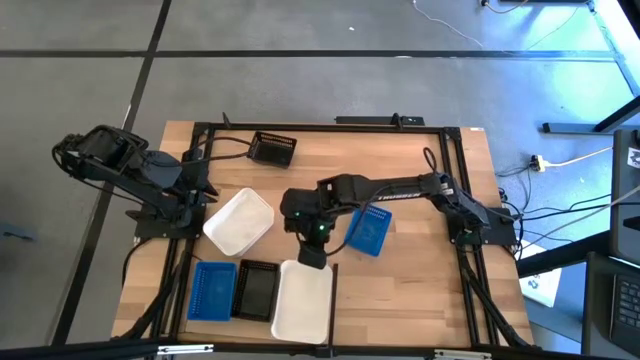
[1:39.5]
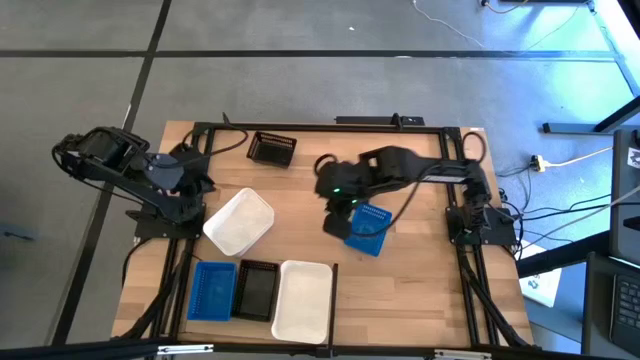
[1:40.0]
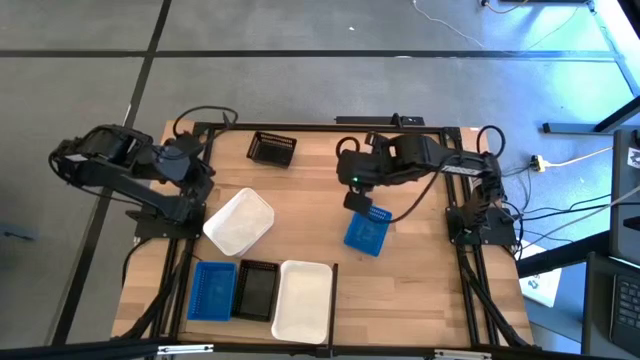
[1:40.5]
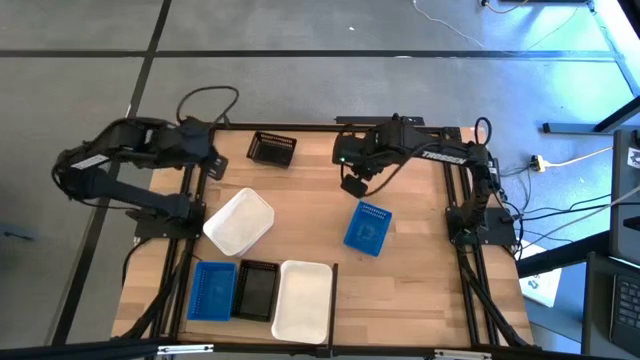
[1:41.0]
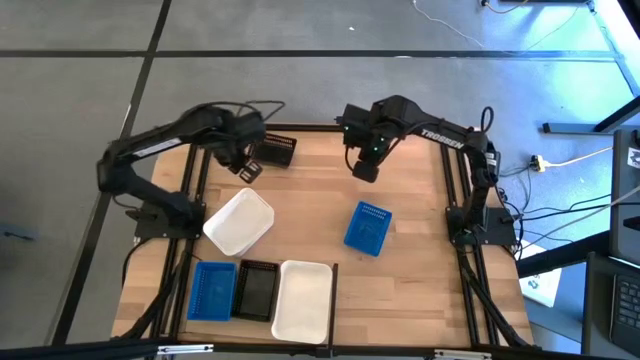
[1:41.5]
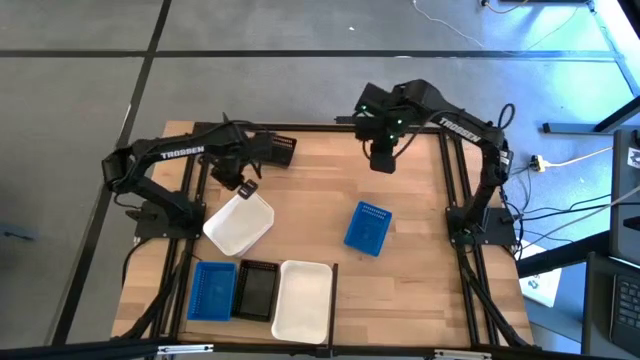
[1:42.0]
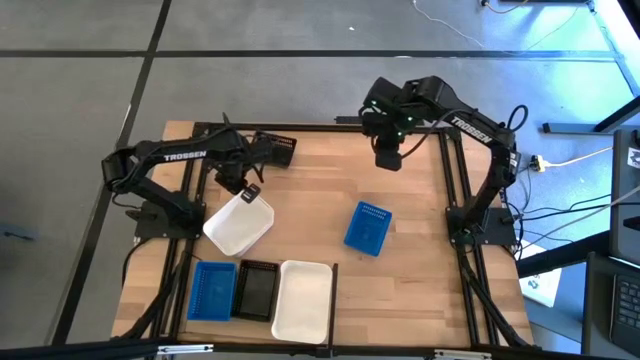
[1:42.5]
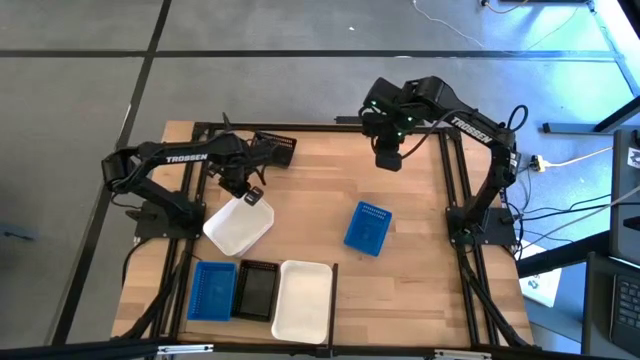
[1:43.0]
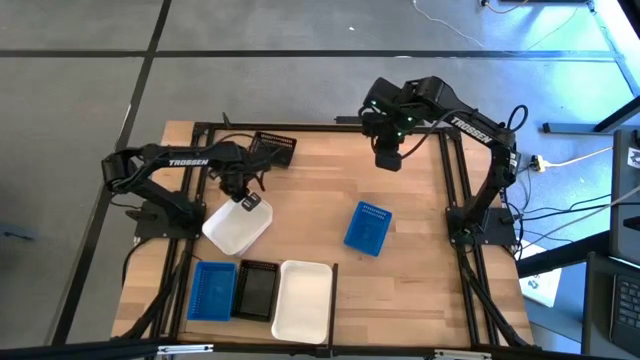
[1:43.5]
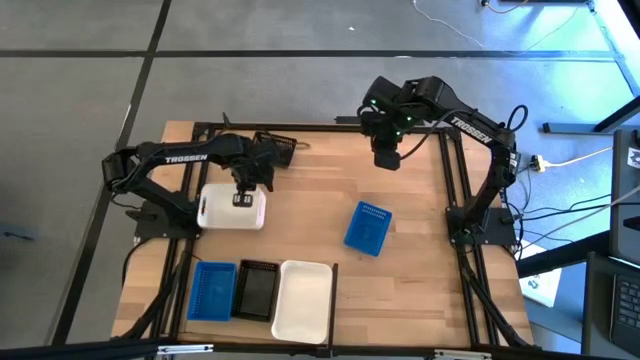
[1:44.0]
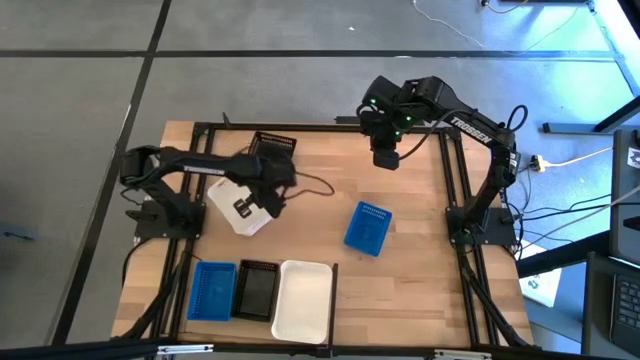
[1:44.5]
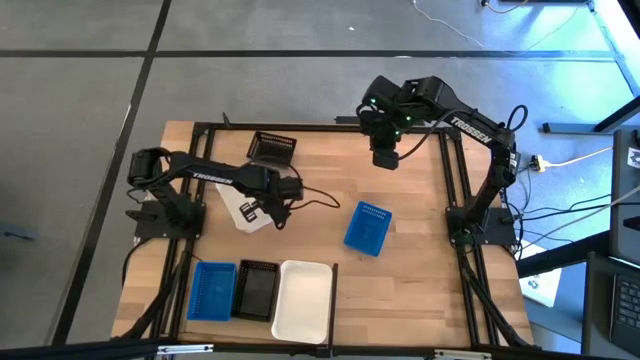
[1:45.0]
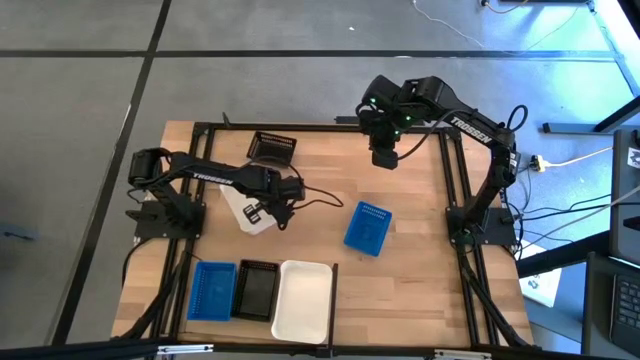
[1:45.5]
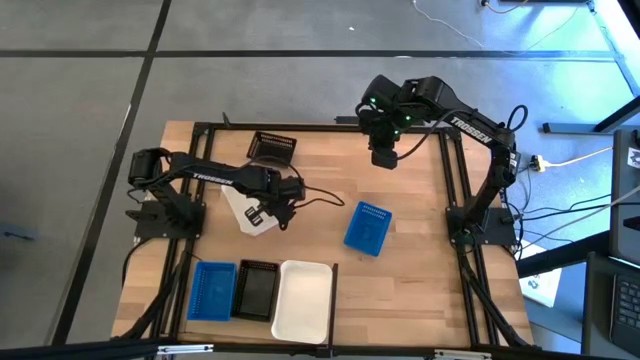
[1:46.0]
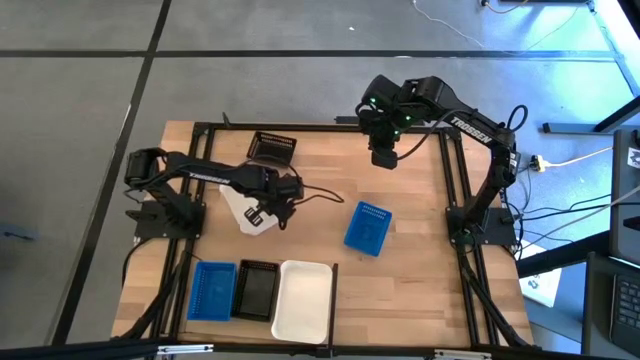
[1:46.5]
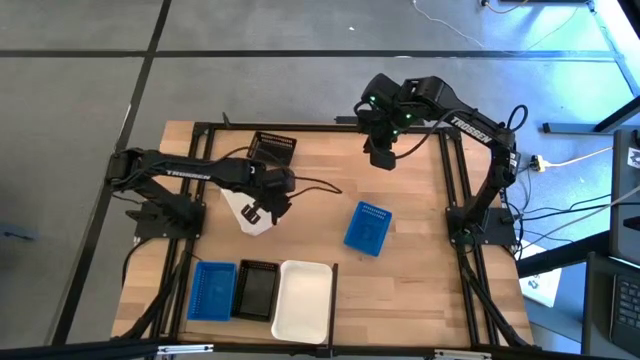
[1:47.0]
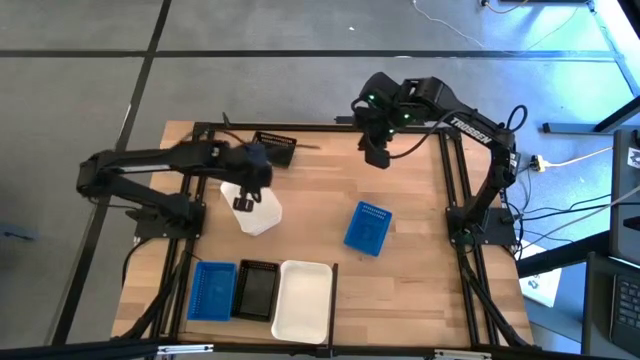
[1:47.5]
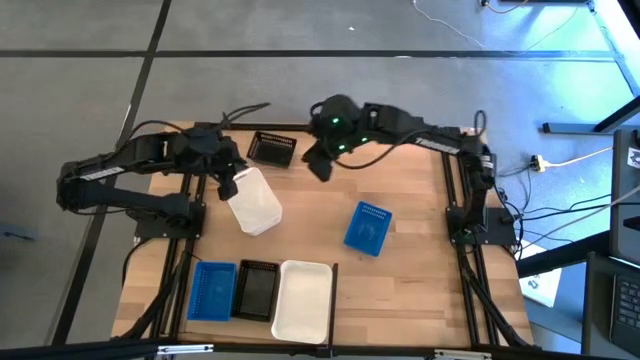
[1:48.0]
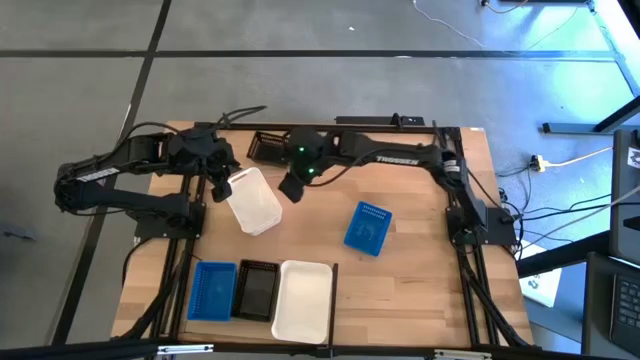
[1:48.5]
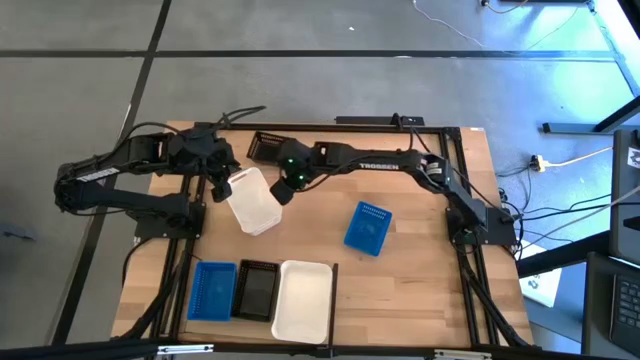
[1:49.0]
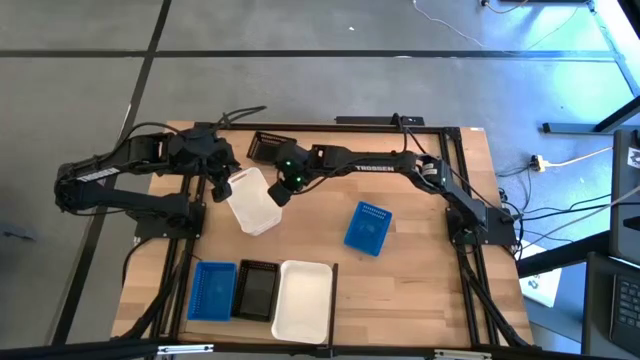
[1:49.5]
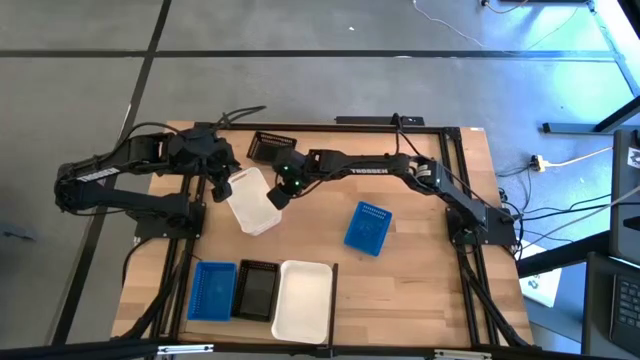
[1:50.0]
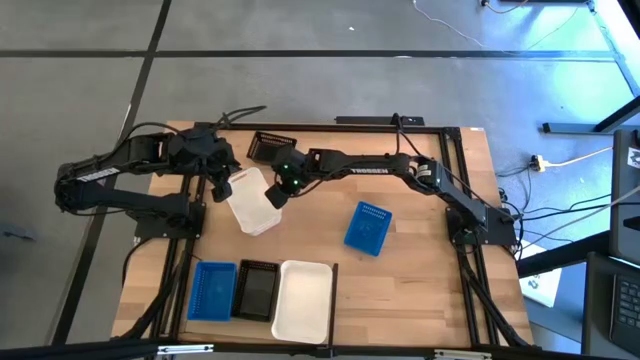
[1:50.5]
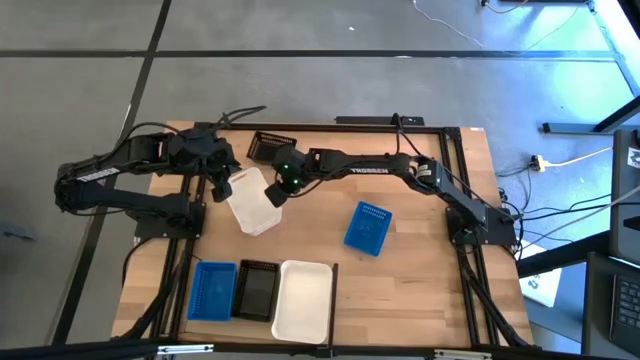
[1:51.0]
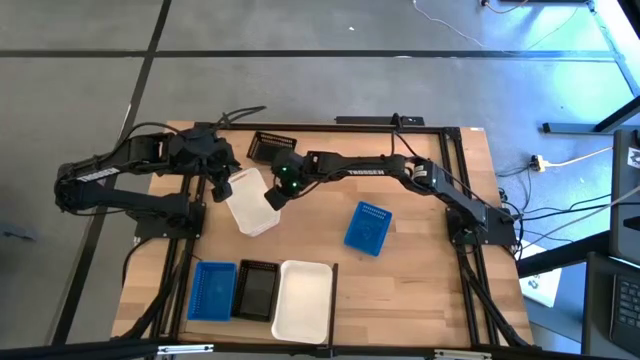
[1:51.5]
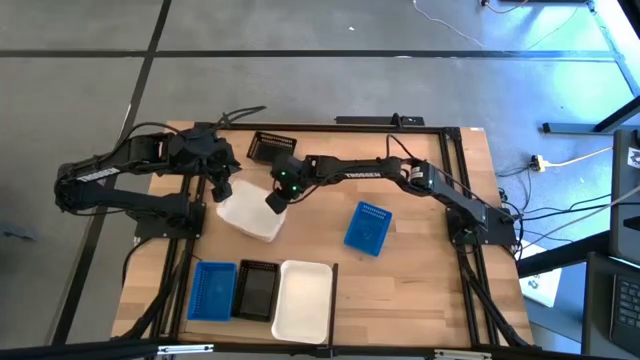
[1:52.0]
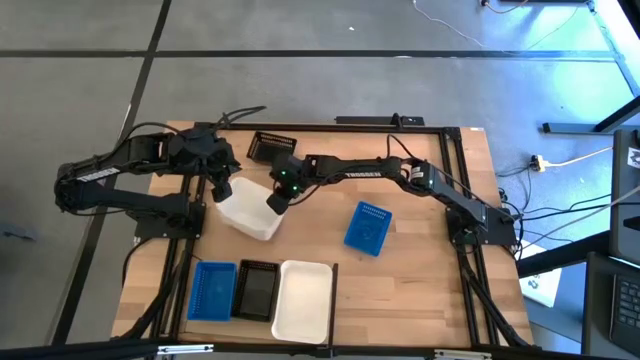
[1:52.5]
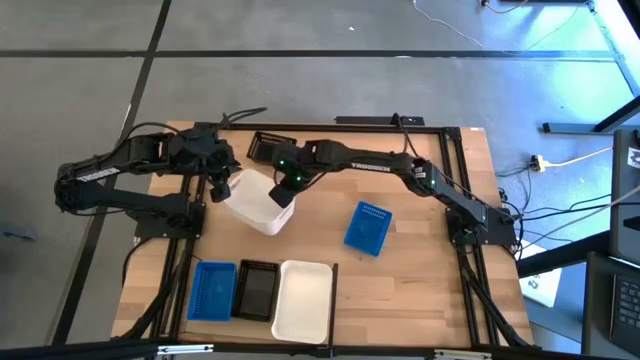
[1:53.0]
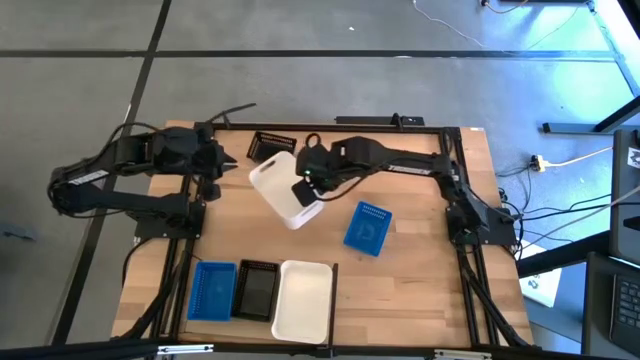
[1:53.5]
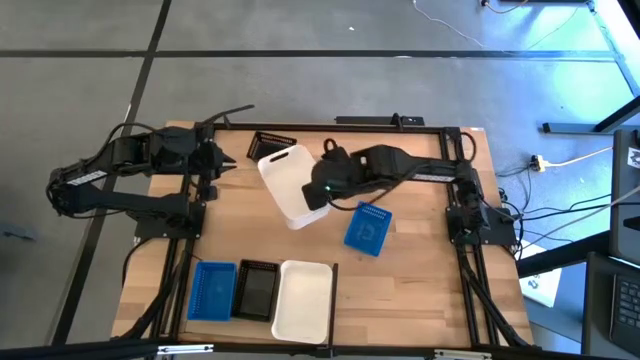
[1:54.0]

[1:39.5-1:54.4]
Task: Stack baskets on shelf by color
Stack the white bin on top of the white bins on the shelf

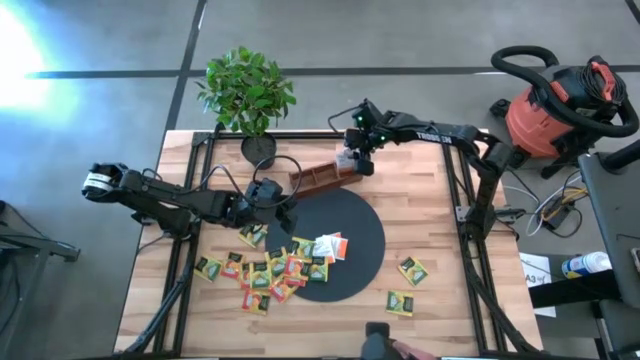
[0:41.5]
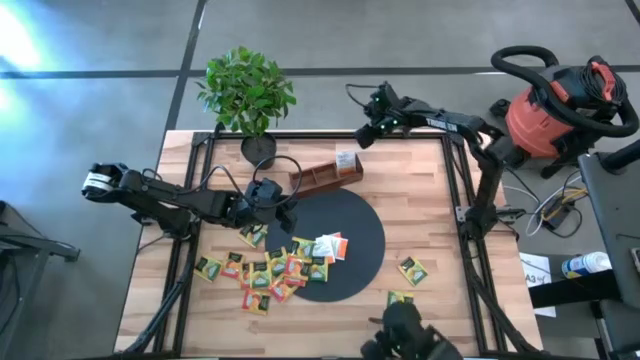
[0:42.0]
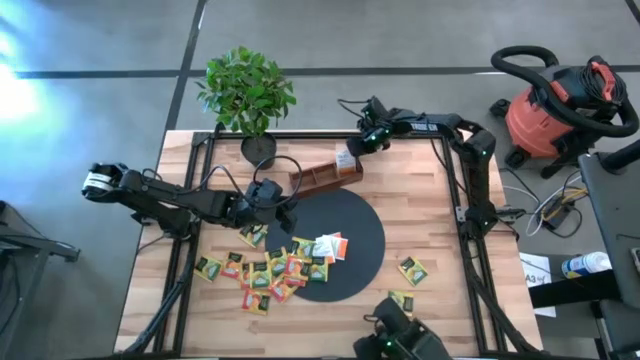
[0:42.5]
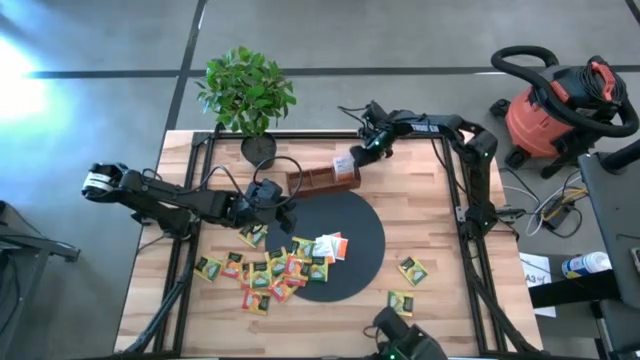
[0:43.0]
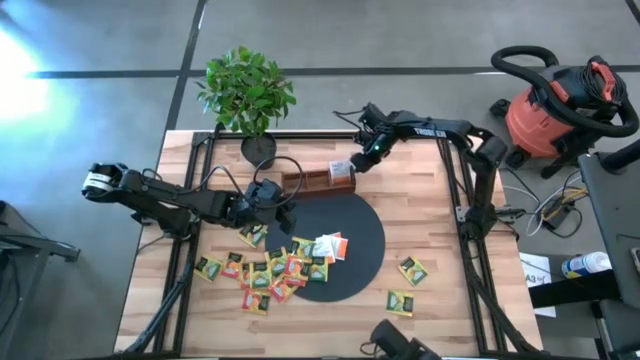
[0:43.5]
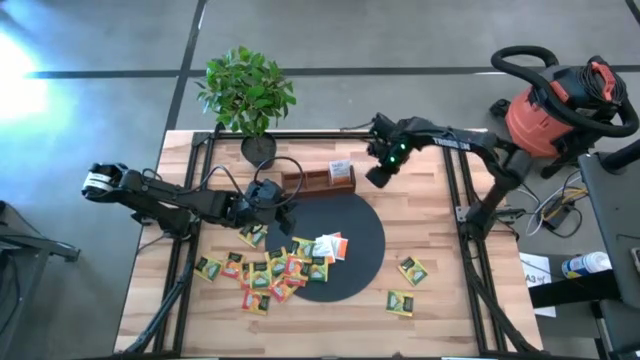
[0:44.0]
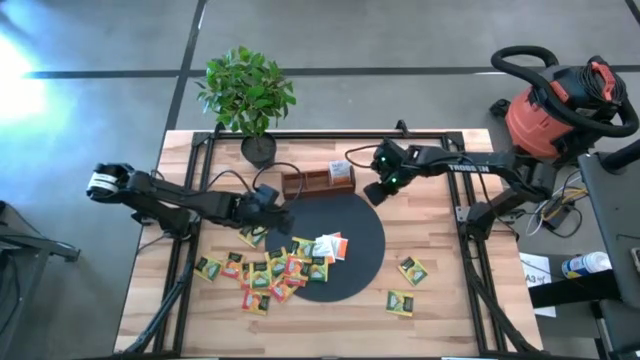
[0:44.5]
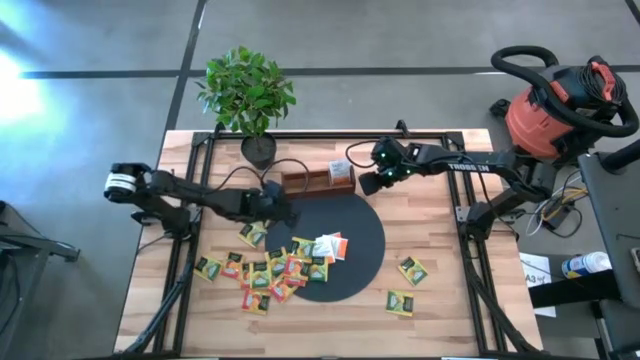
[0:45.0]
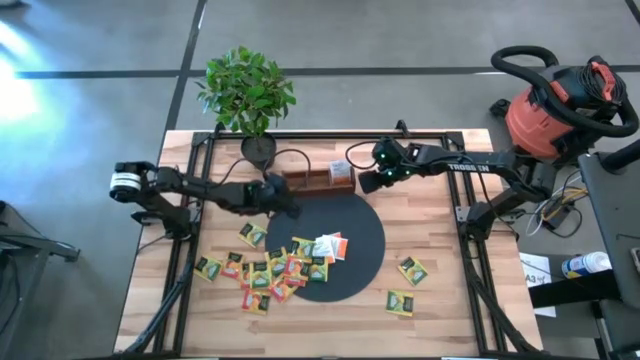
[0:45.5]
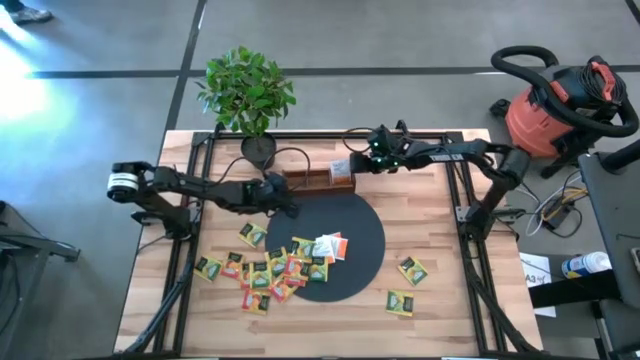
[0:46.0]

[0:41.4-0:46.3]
Task: Pick & Place Tea
Adjust the wooden organizer on the table
